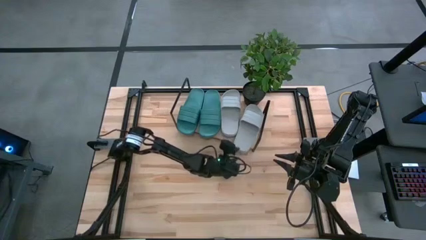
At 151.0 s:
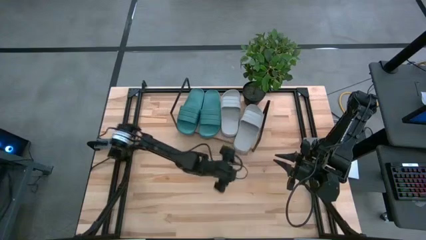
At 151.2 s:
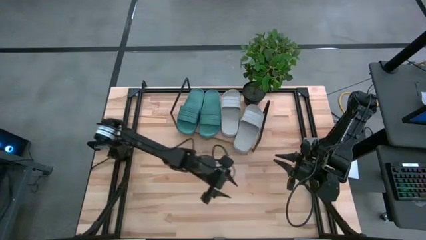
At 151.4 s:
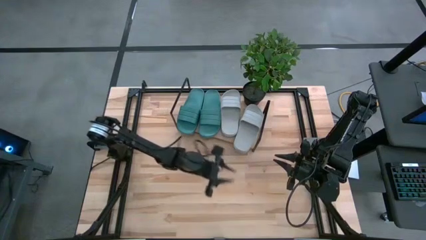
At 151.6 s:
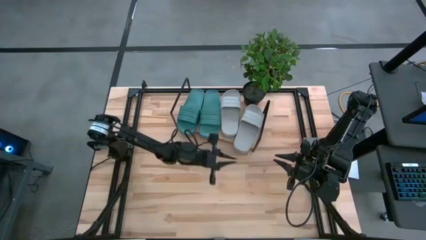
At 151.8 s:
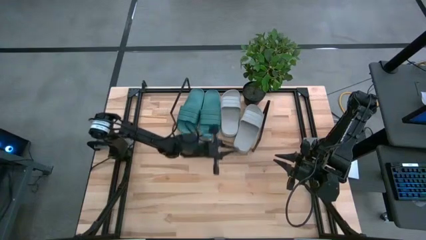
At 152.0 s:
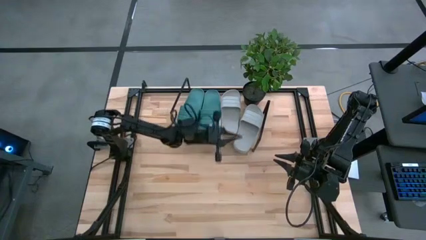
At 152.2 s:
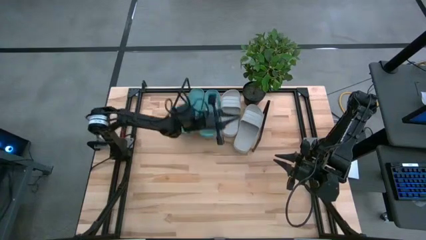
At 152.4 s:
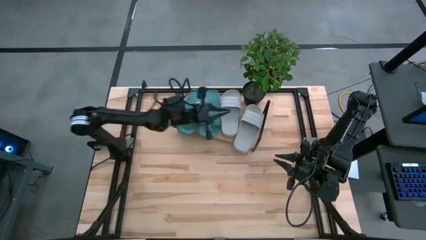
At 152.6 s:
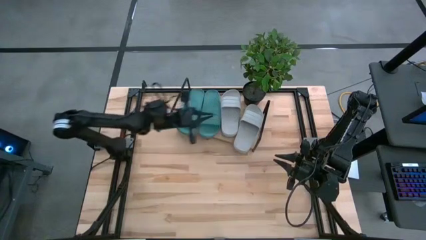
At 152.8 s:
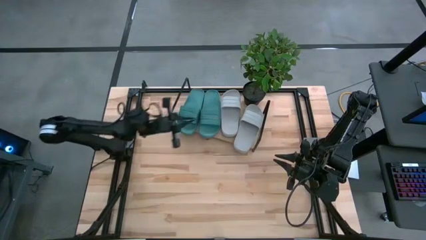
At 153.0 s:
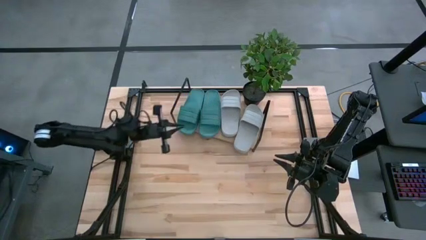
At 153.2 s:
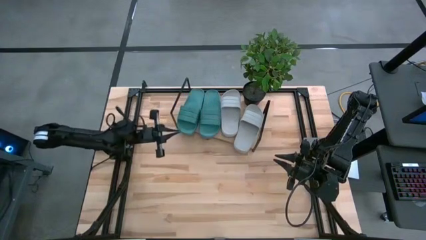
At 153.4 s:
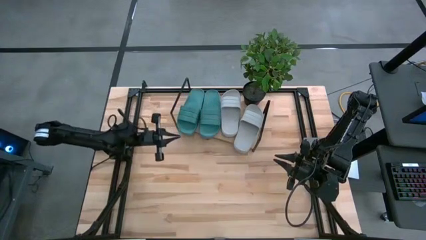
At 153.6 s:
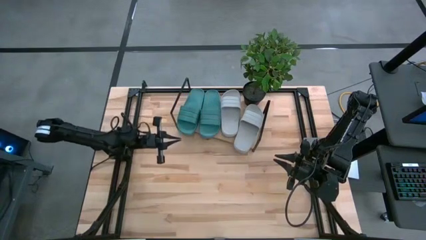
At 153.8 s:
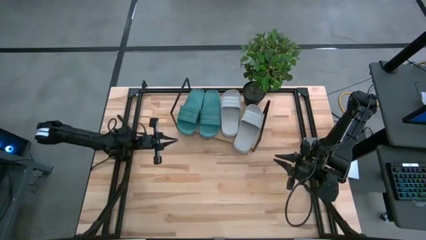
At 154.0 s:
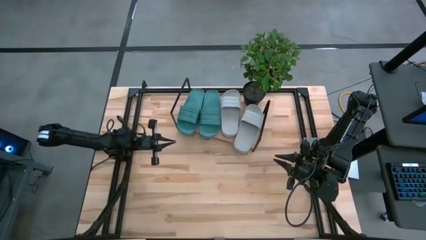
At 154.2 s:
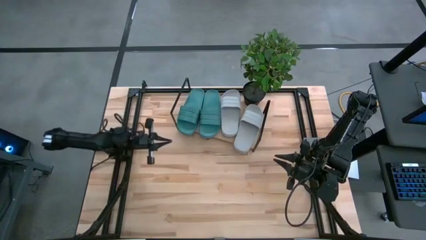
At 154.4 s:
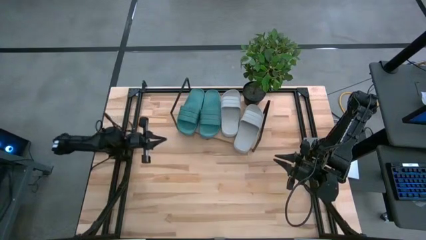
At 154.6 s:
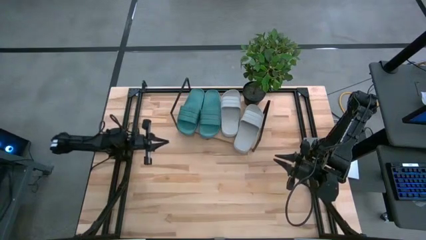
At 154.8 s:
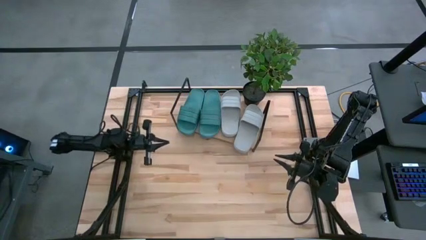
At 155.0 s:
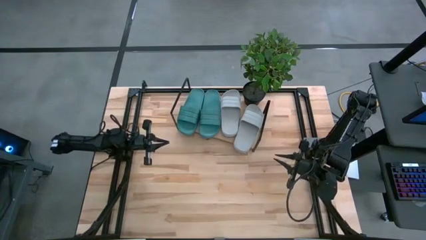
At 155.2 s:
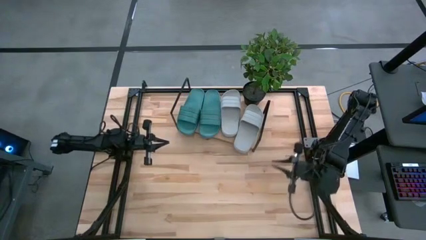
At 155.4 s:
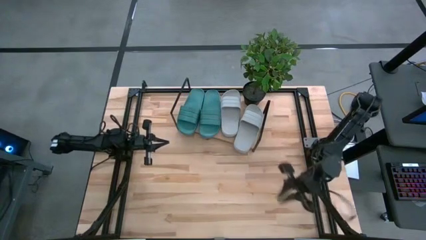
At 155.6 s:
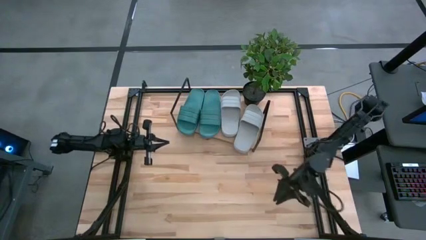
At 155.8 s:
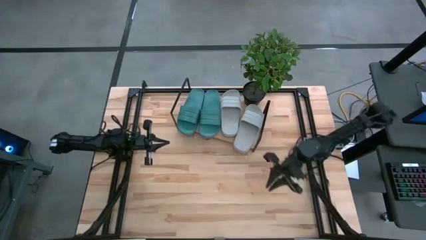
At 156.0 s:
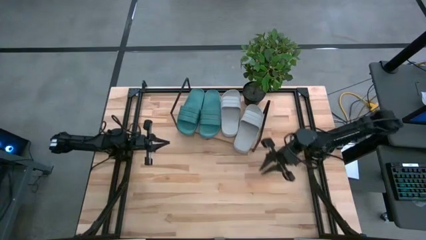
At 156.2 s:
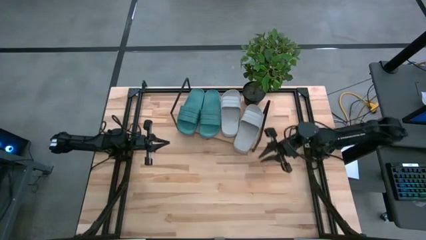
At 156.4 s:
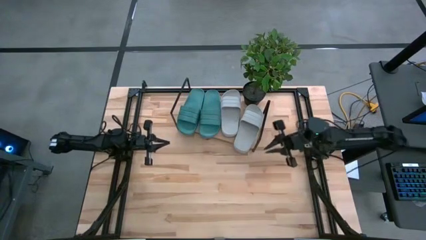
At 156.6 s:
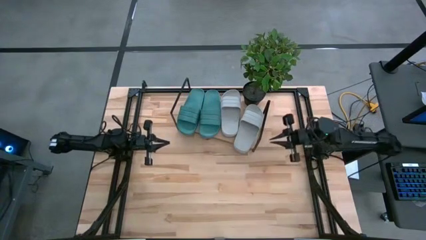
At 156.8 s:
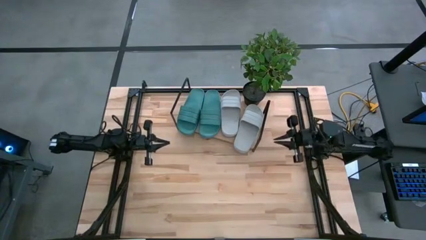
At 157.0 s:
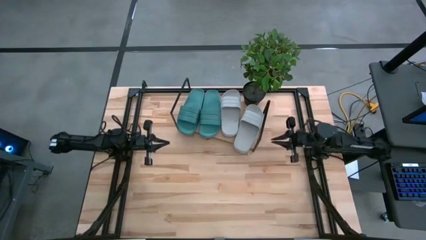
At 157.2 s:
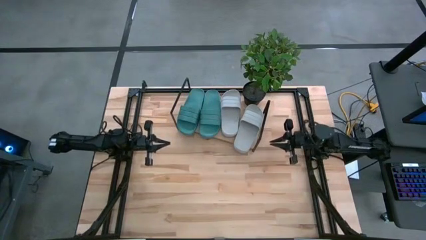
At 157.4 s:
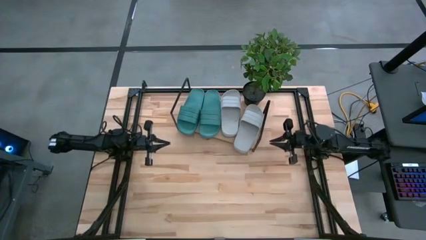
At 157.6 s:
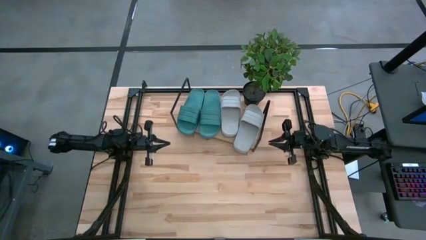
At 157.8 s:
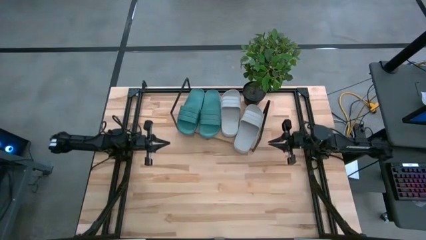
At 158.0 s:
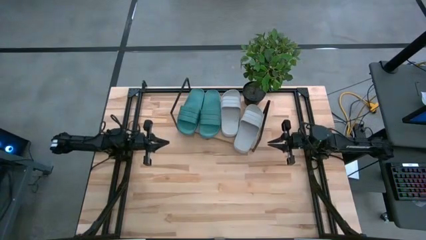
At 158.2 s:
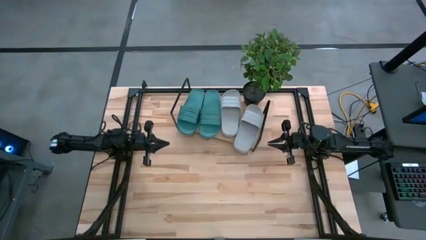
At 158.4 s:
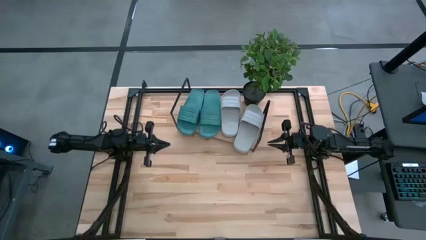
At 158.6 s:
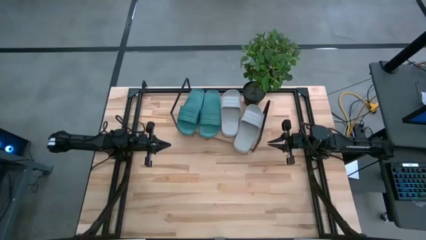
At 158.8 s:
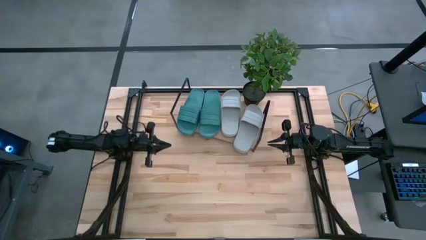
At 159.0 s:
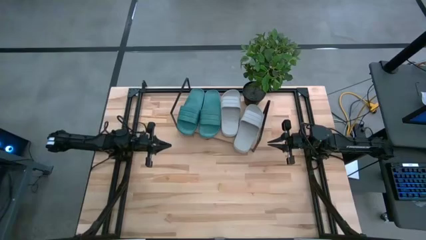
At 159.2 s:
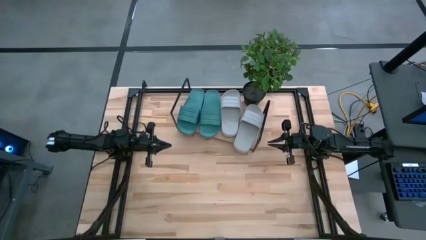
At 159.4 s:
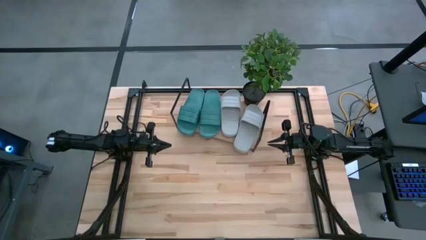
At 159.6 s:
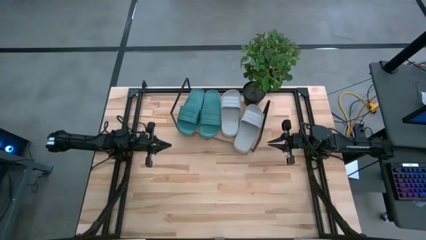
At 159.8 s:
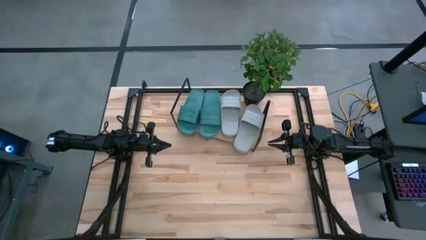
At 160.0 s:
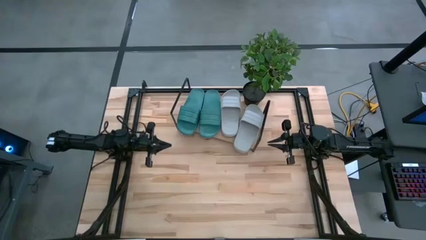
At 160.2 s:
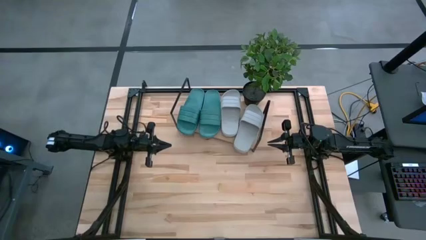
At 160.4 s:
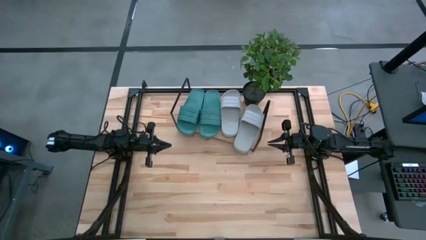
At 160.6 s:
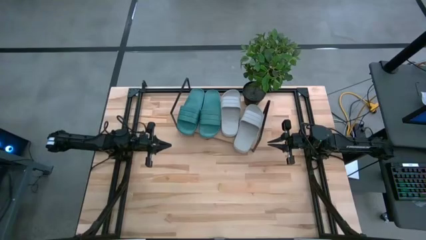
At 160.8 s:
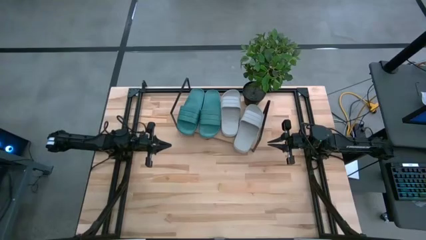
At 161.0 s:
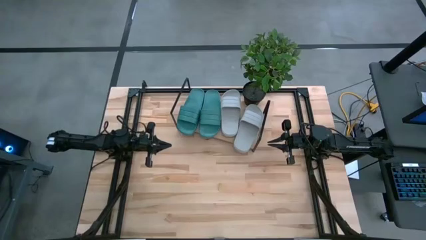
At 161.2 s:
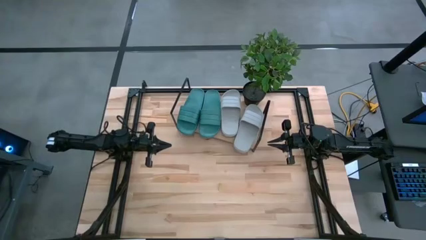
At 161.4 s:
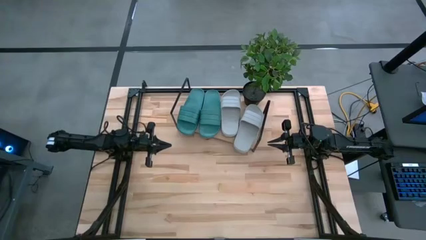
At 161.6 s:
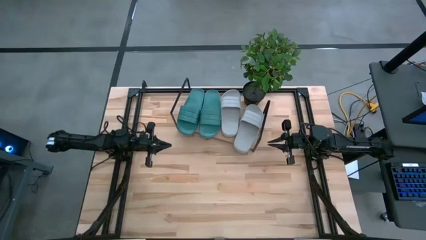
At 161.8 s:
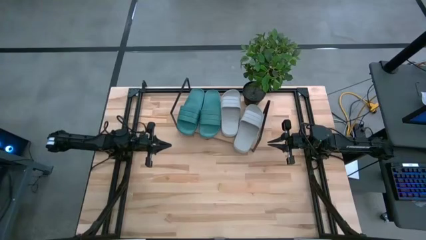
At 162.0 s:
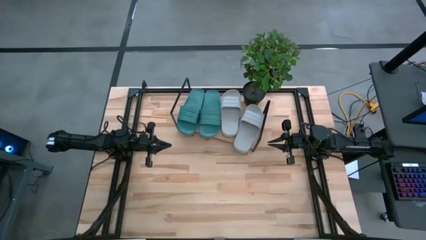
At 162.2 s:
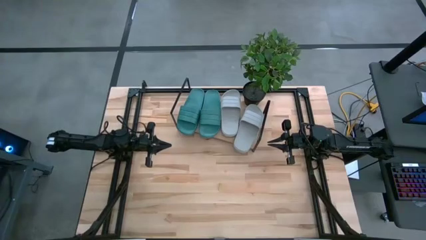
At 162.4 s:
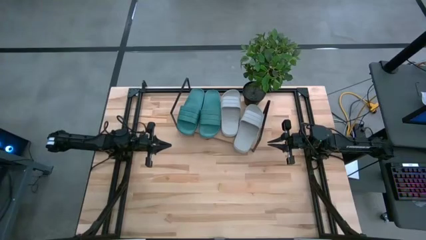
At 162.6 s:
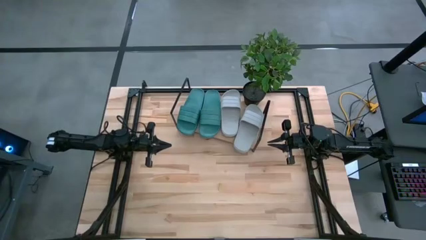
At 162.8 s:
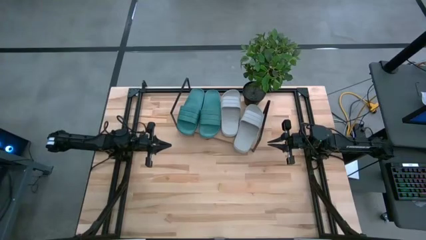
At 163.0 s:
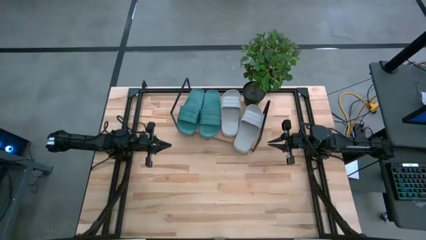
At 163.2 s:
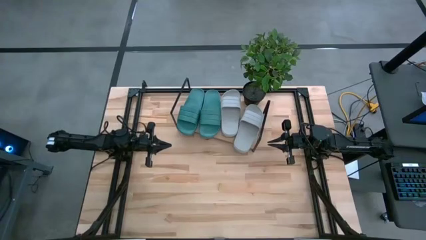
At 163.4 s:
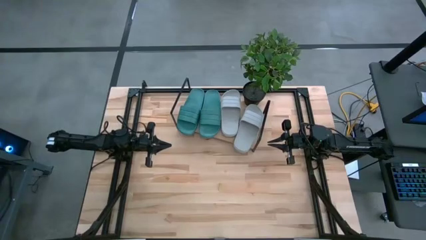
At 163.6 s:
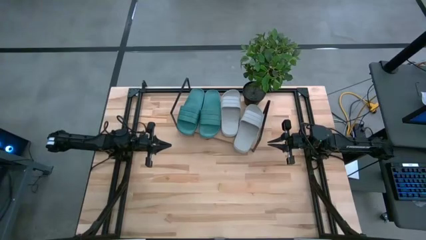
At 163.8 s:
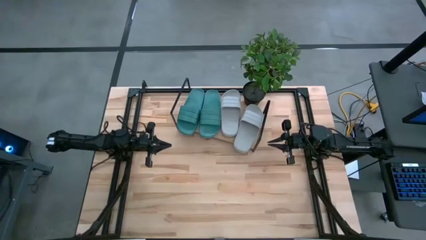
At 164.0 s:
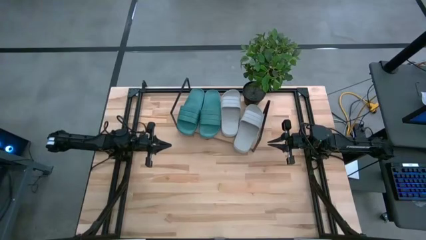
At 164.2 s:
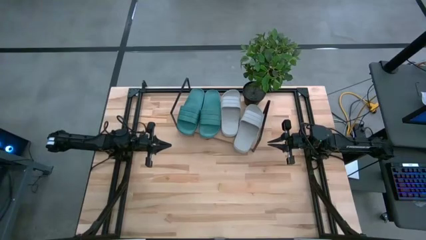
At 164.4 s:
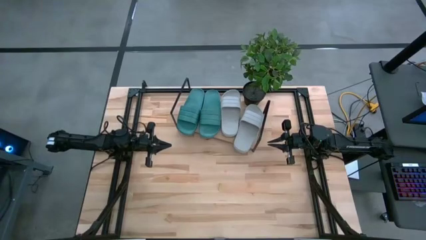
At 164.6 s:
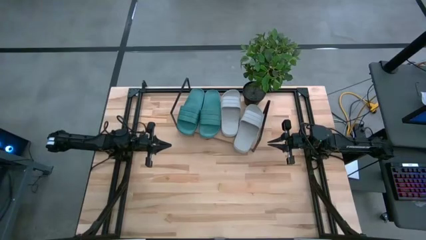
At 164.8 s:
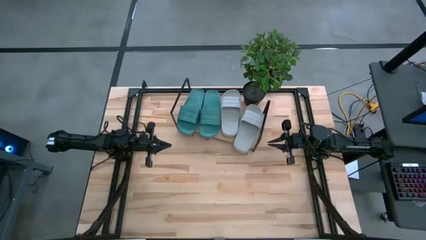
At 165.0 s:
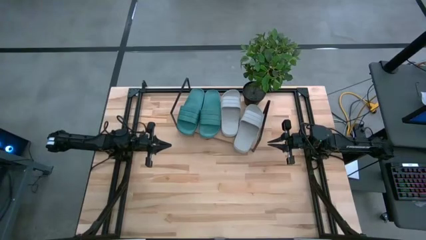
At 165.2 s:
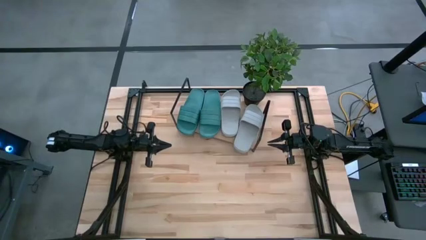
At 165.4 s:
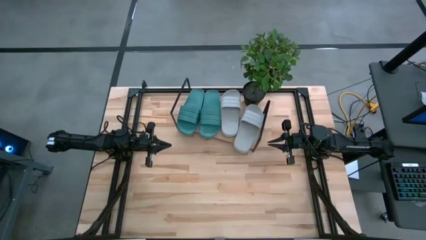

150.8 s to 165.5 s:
Task: Pick and place slides into the shelf
Return to Home Position
